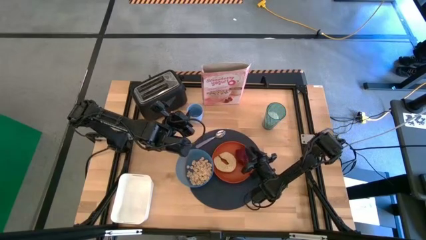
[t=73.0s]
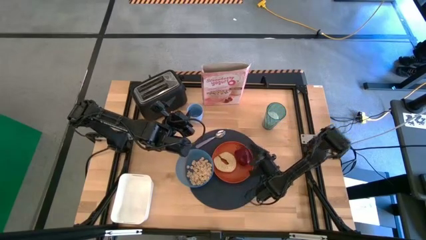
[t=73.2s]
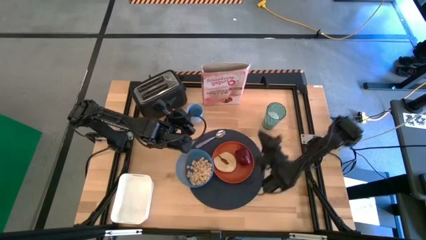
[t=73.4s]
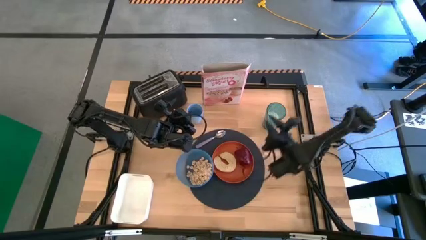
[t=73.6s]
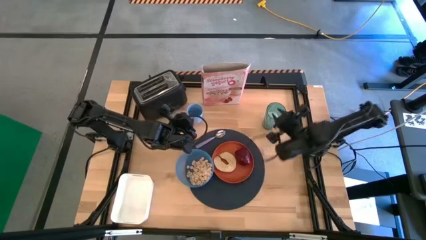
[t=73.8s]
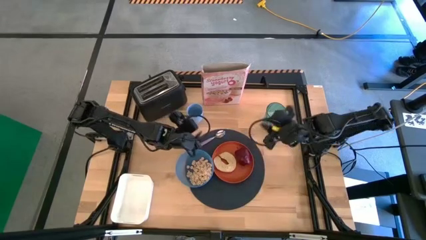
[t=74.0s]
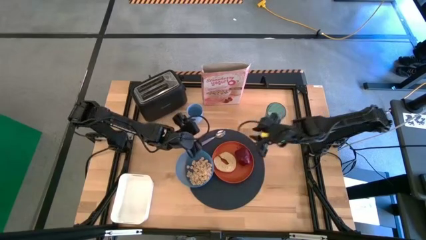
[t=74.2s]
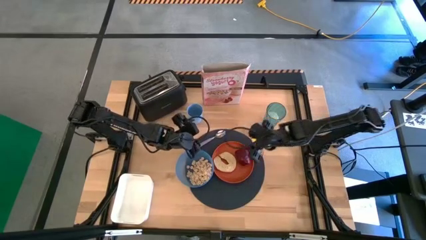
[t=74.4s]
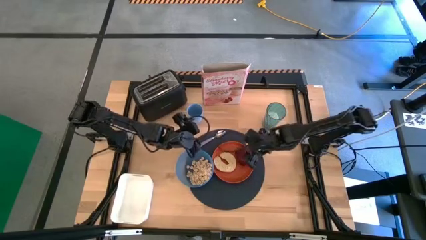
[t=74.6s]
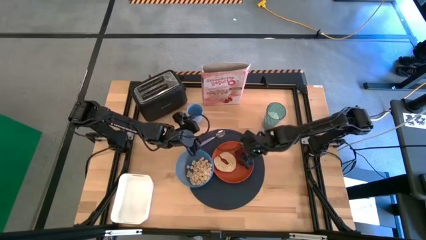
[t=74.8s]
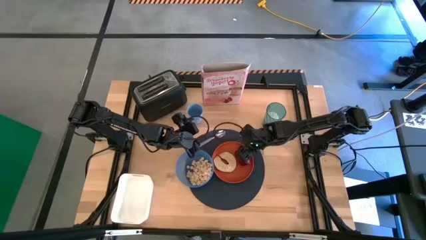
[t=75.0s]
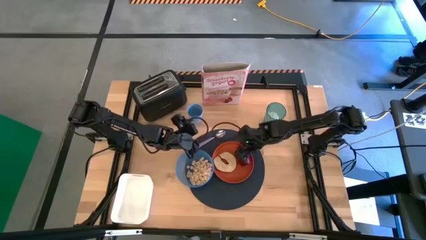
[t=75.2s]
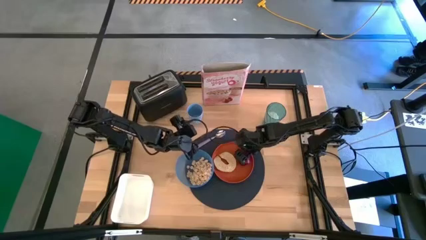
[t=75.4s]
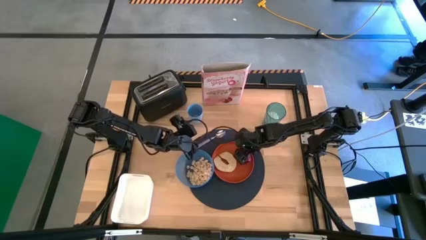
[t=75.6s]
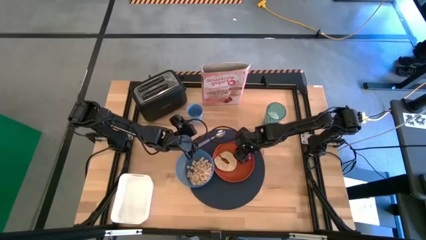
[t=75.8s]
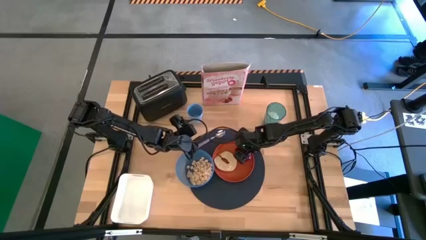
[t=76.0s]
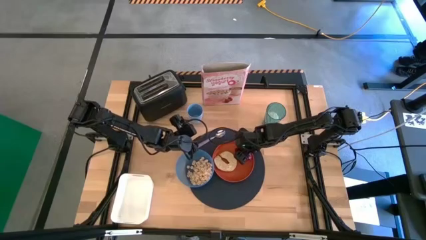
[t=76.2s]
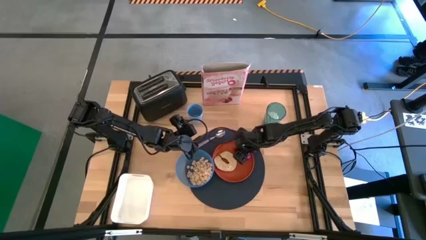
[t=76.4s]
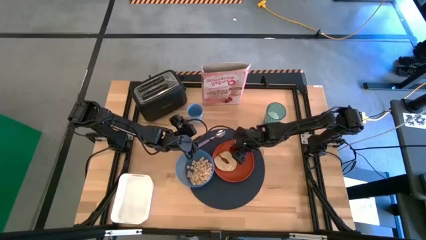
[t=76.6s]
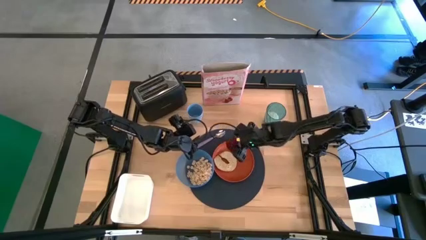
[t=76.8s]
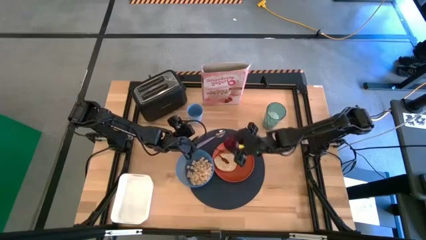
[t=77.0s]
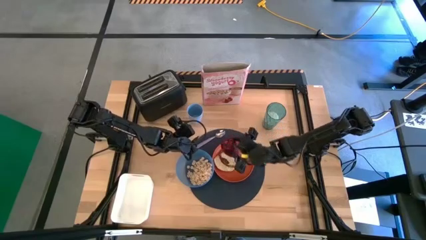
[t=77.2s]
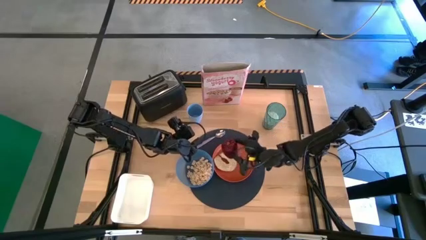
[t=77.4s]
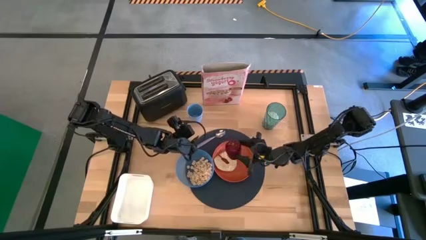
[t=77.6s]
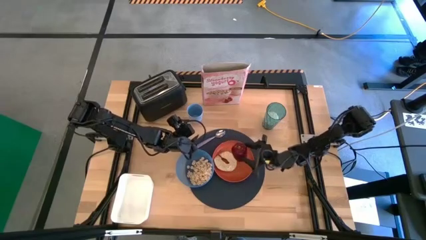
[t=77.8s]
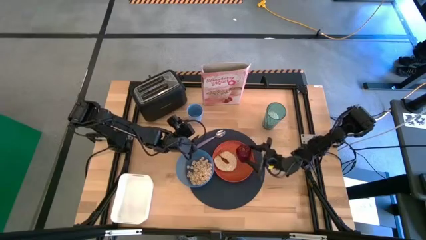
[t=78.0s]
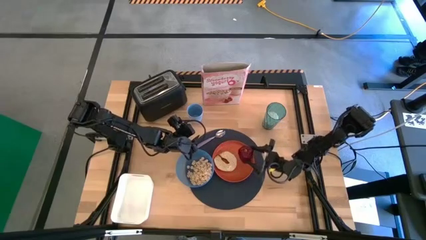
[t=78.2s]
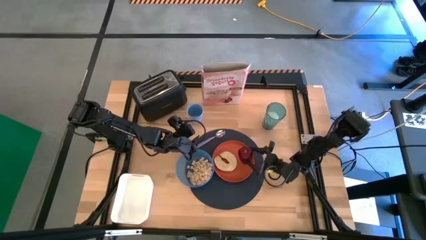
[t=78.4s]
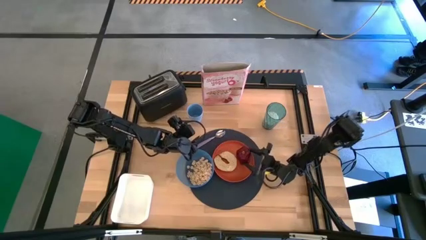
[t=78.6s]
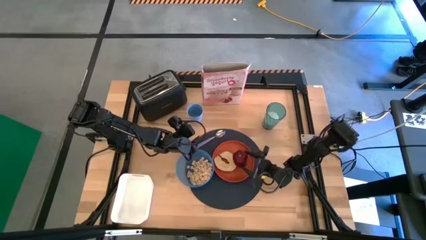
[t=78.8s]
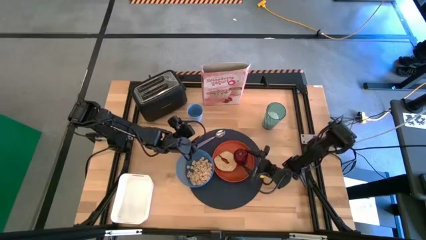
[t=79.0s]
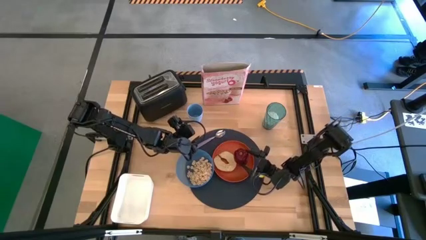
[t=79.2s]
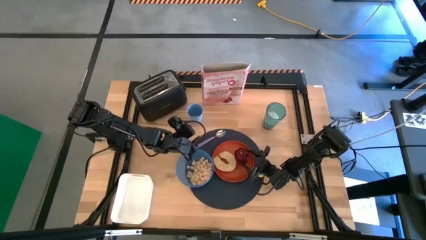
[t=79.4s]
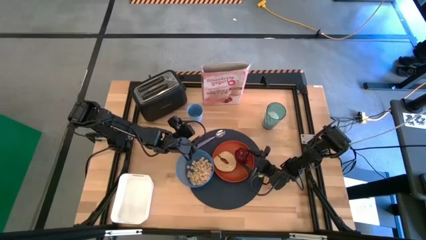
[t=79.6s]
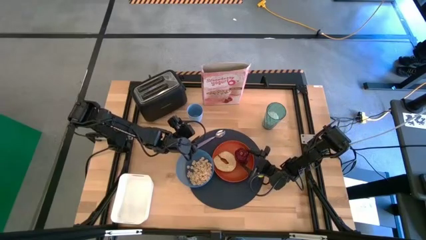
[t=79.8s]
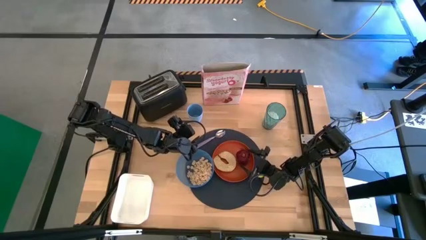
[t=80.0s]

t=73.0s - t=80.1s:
Task: Arrange a breakfast setting
Adjust the red apple on the orange plate

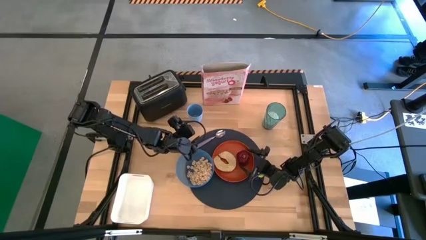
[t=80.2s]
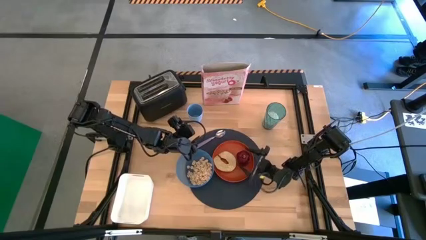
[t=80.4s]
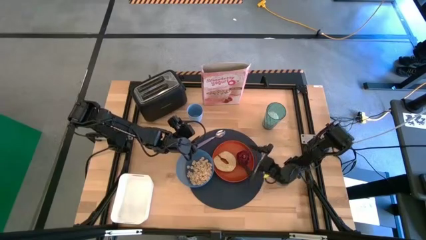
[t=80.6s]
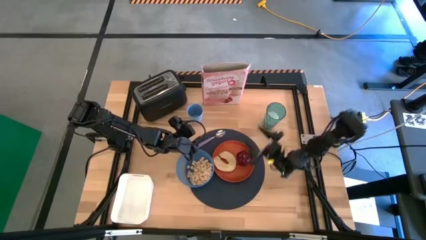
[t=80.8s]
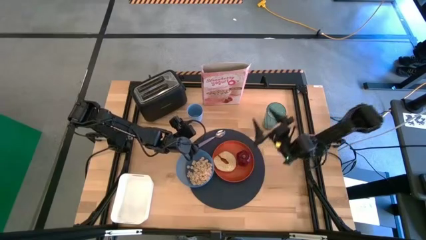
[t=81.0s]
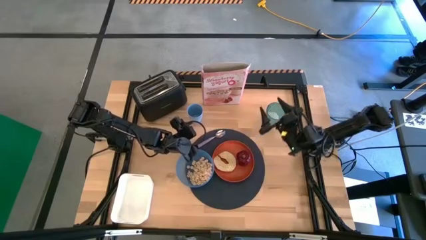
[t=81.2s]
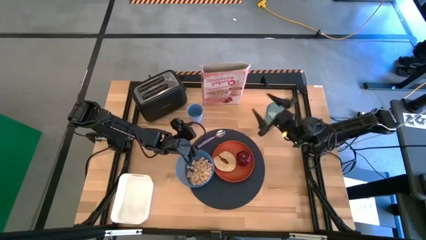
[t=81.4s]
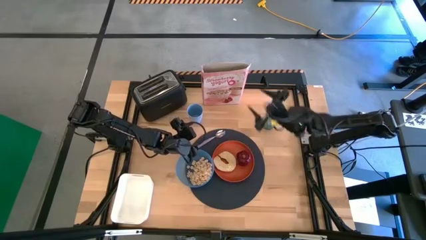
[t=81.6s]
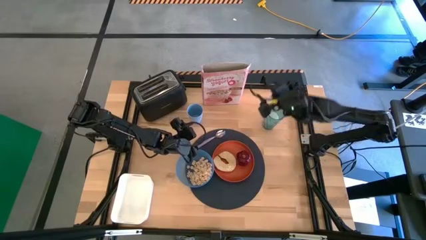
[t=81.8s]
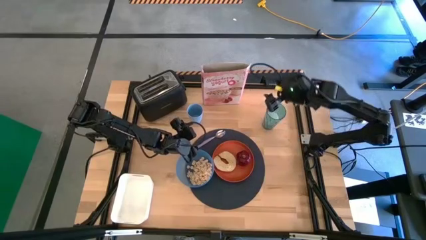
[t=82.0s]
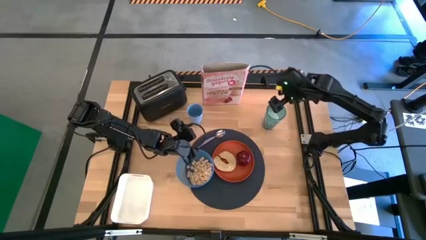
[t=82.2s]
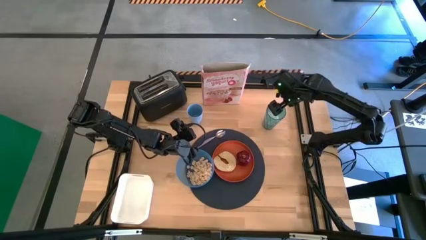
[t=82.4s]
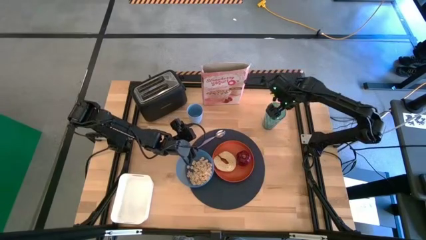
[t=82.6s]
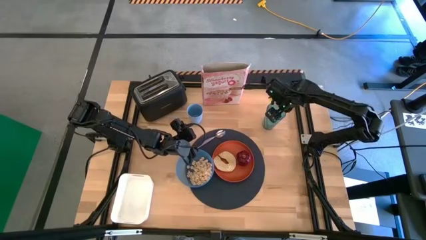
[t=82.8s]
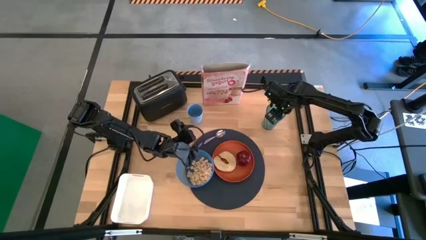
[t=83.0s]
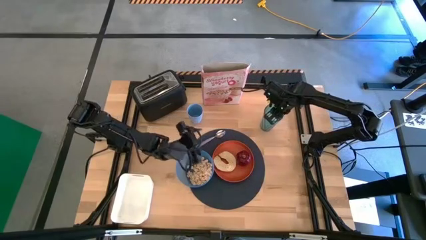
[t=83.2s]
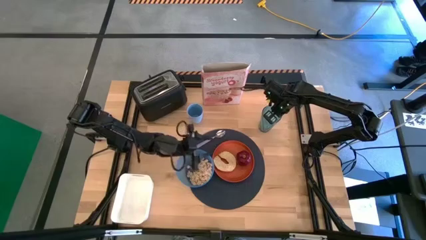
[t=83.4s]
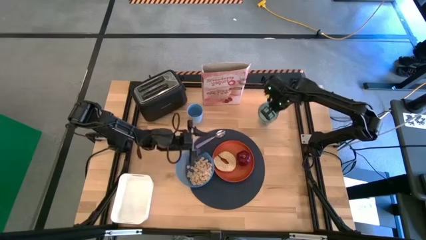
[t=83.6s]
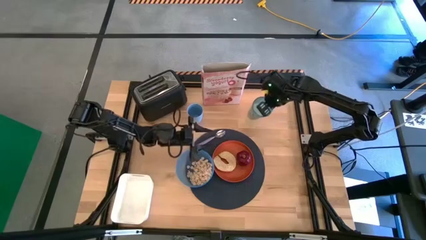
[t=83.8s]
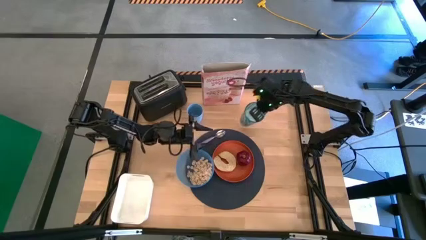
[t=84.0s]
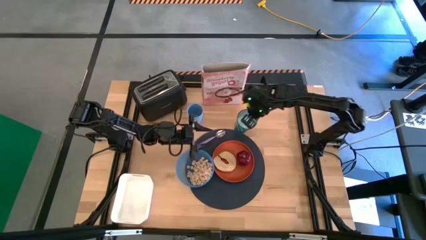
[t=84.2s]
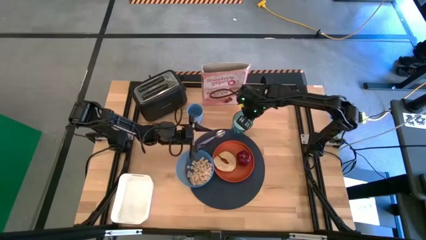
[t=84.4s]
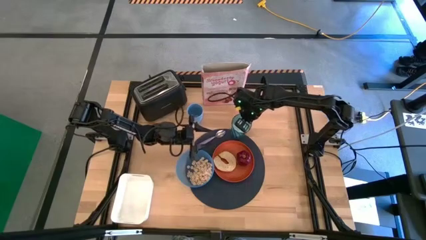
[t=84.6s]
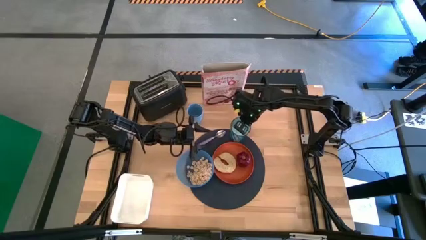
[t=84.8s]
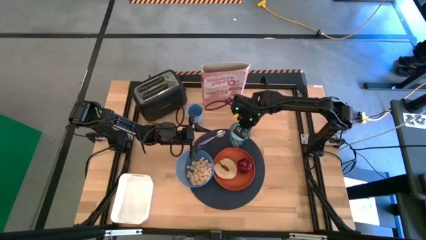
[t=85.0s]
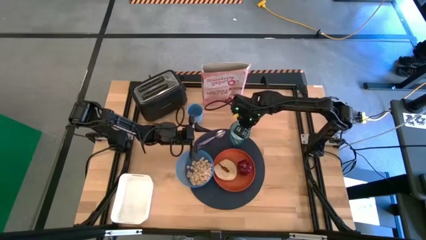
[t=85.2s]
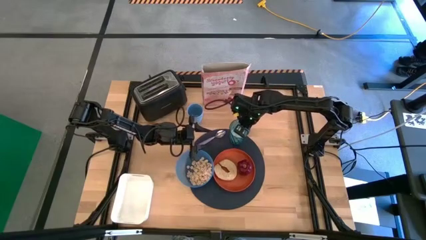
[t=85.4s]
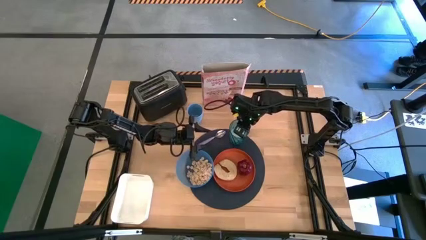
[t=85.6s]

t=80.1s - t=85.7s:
Put the blue glass on the table mat
